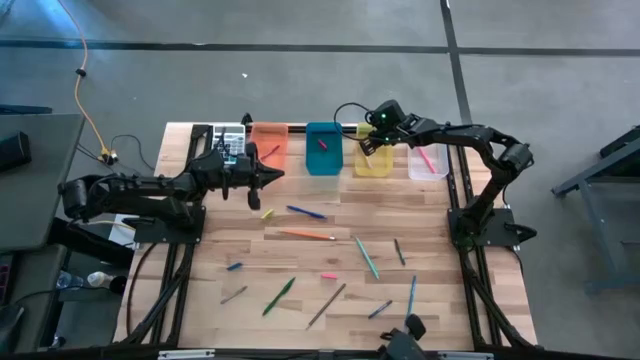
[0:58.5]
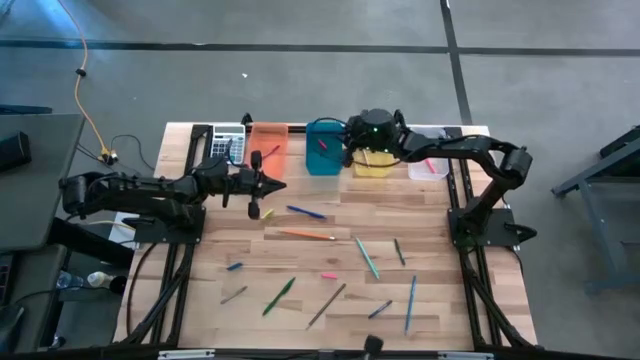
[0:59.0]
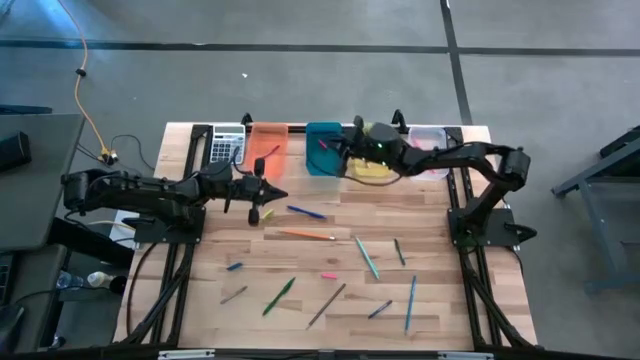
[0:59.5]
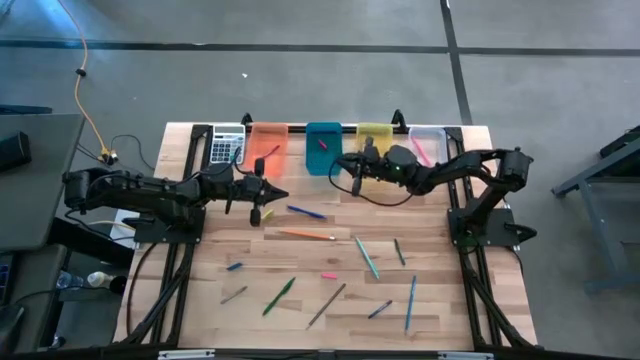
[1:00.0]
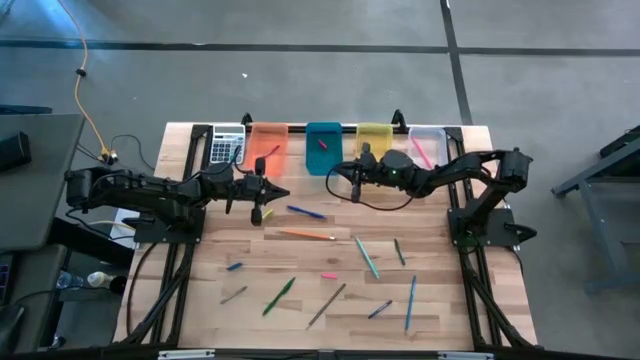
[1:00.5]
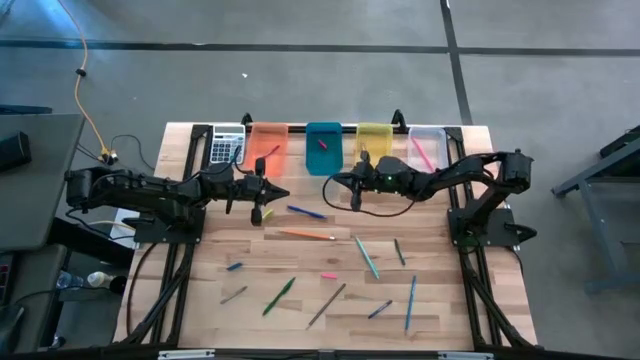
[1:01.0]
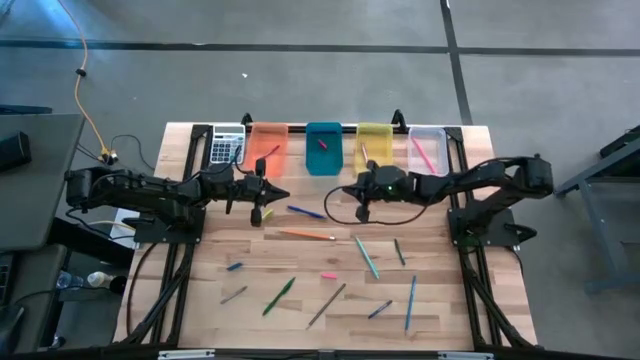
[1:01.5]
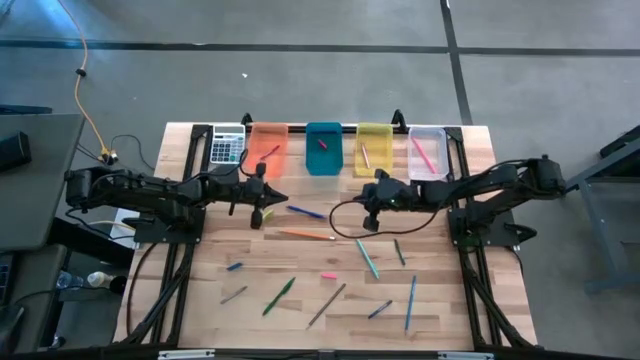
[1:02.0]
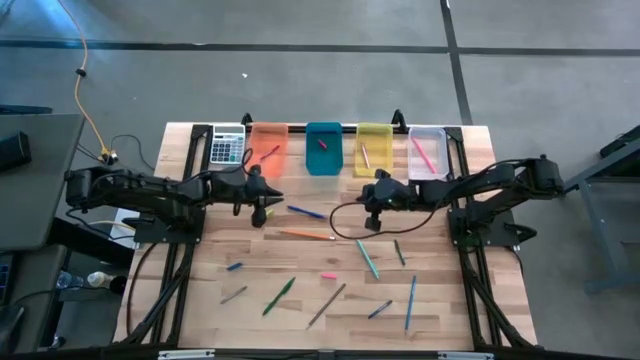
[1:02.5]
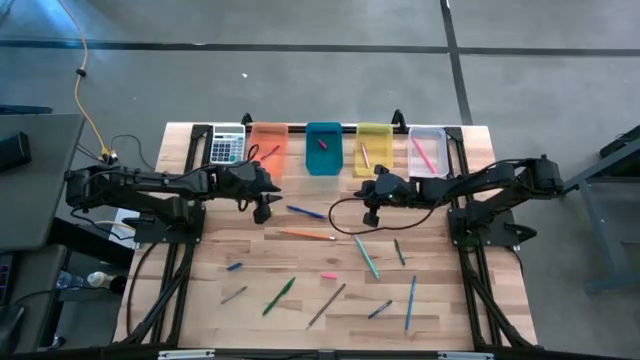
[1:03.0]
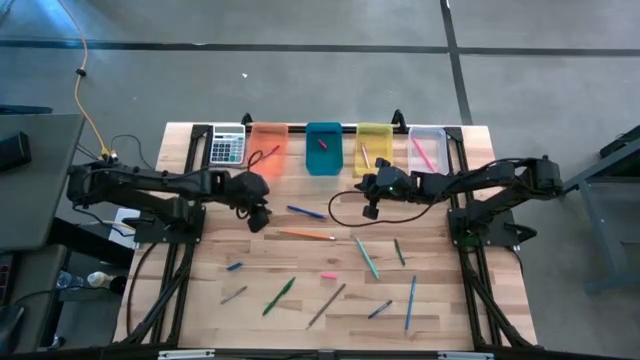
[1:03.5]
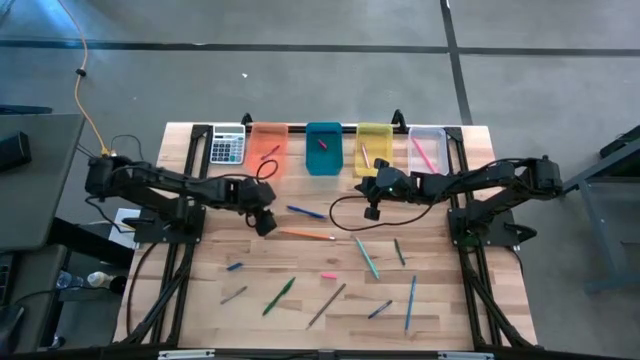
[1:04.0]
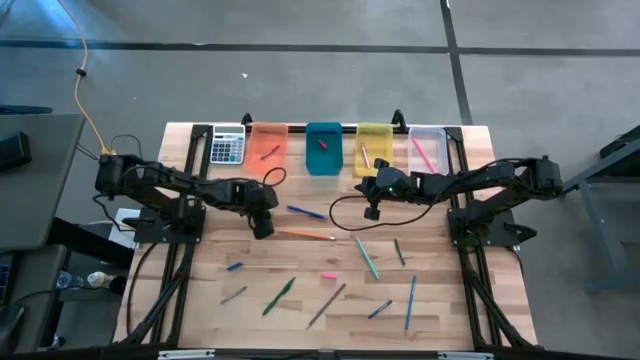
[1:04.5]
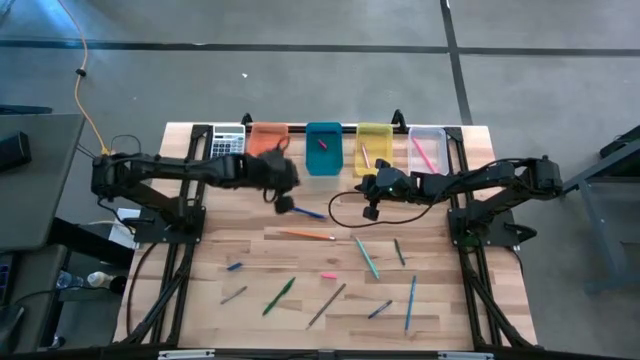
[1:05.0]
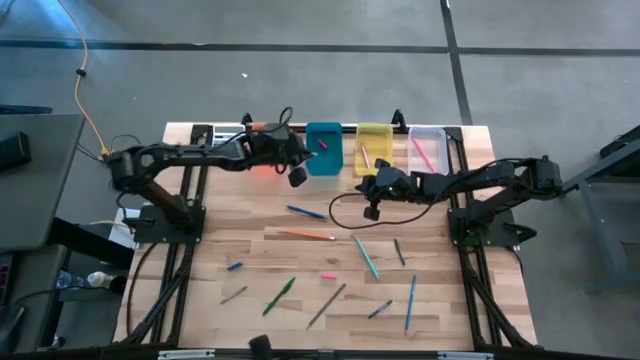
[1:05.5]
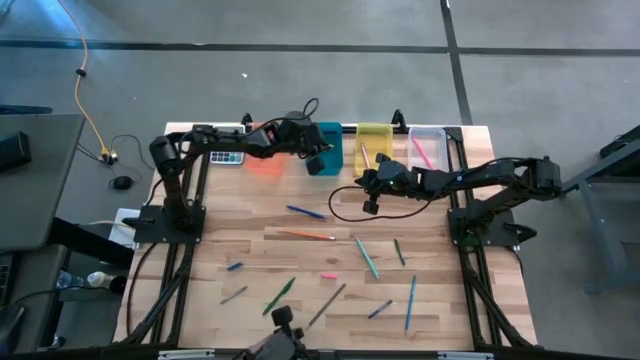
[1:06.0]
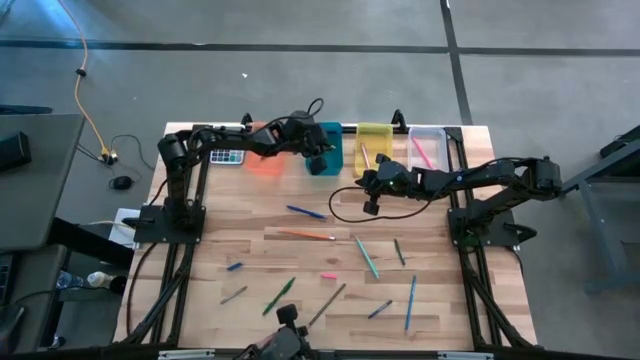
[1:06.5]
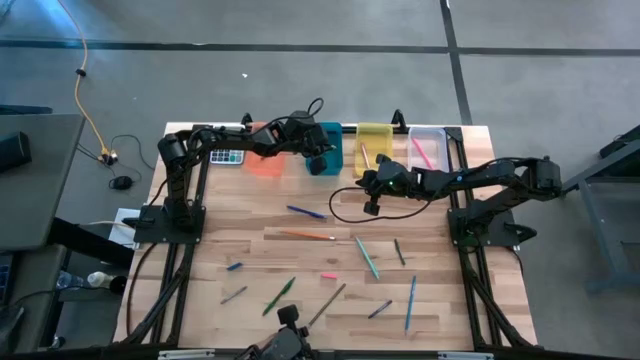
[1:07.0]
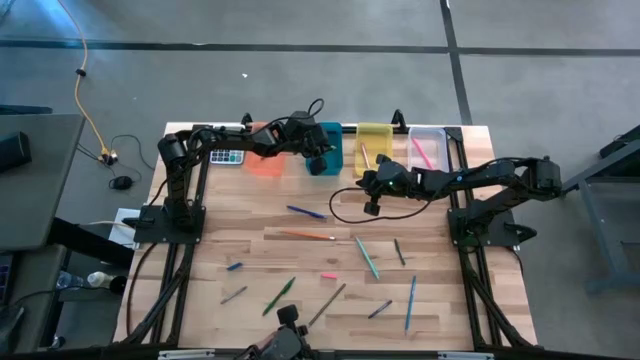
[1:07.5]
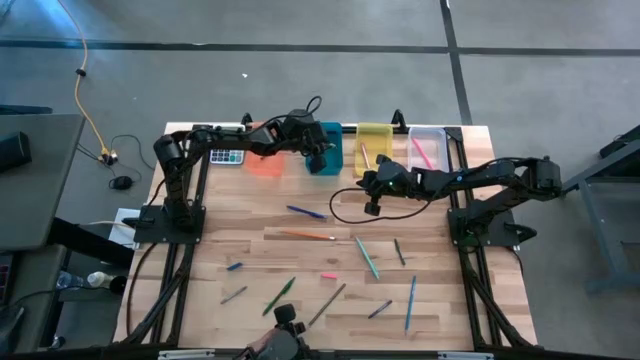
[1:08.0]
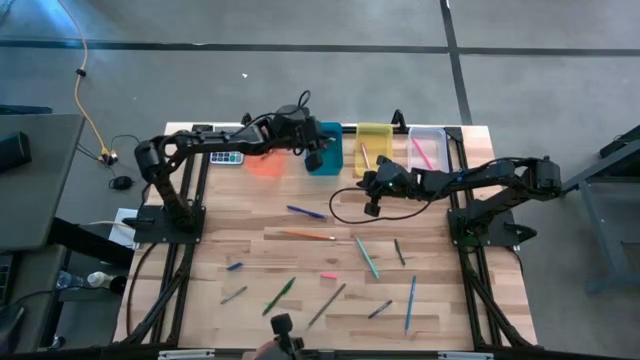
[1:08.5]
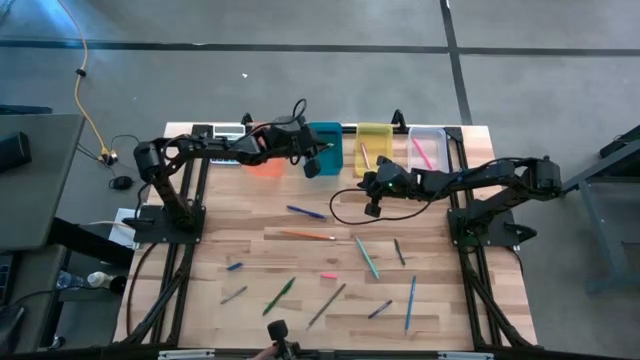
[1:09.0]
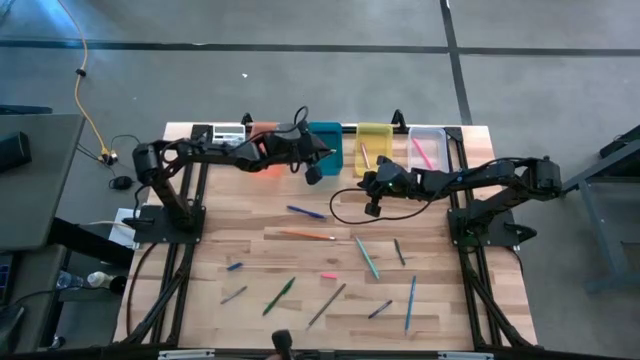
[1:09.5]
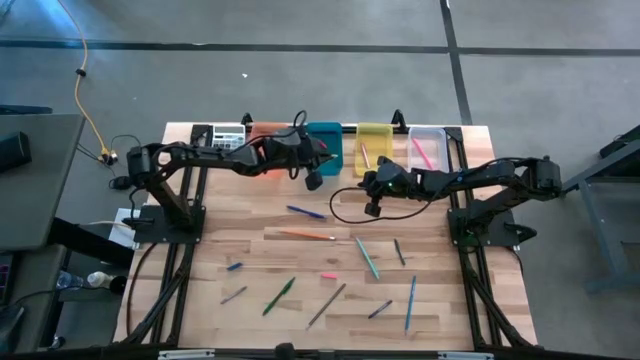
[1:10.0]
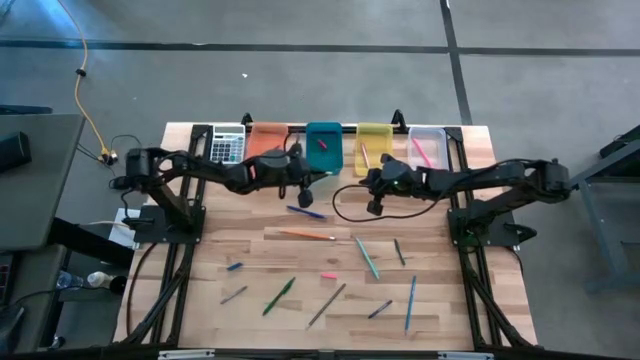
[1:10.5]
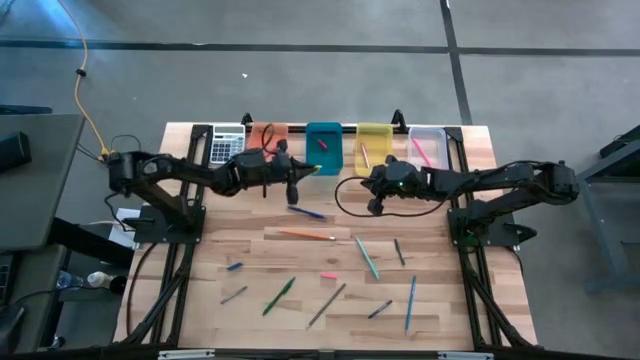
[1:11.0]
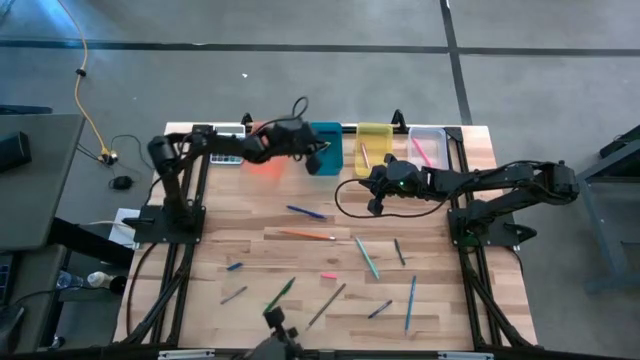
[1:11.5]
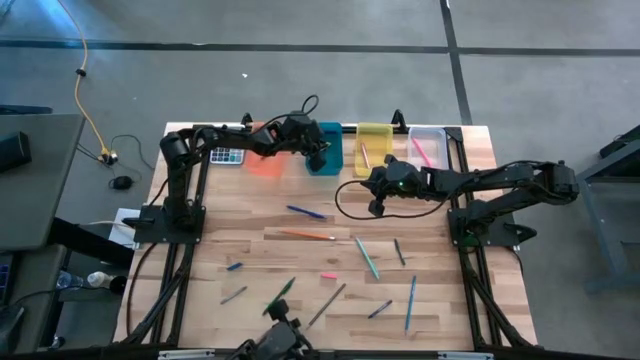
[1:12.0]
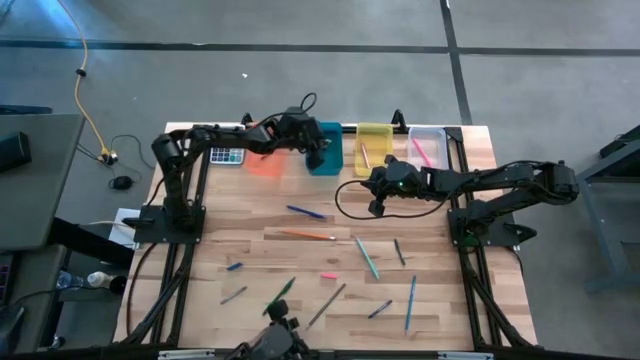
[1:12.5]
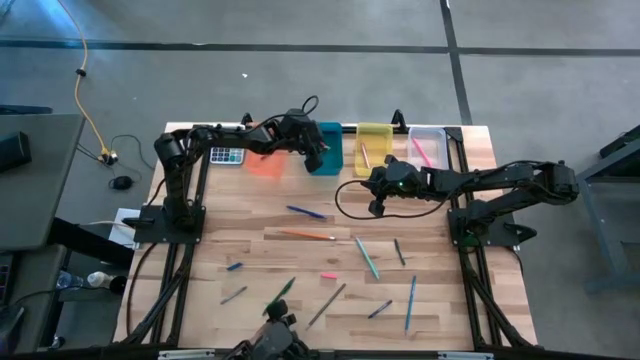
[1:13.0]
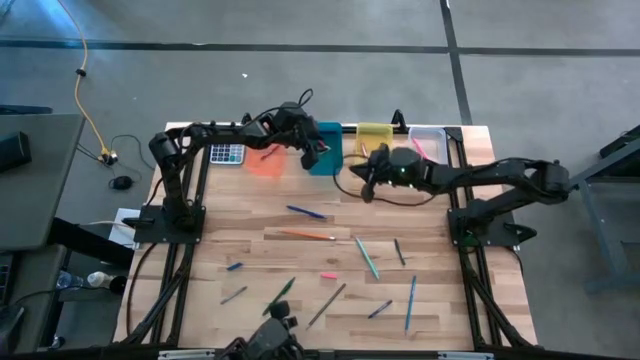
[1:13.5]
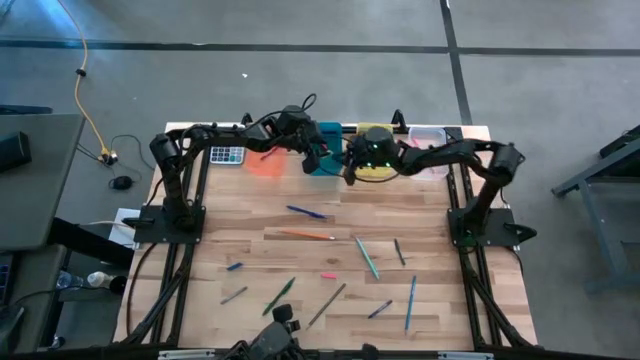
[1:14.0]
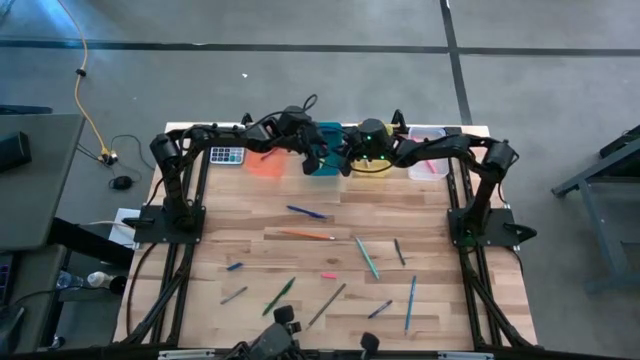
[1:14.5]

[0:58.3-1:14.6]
Task: Sort crayons/erasers/pens/pencils in bins
Put the green eraser into the blue bin

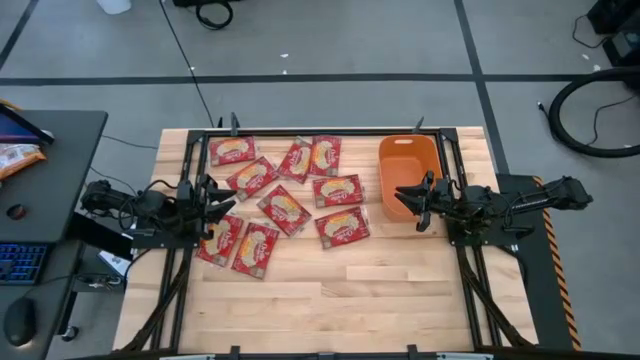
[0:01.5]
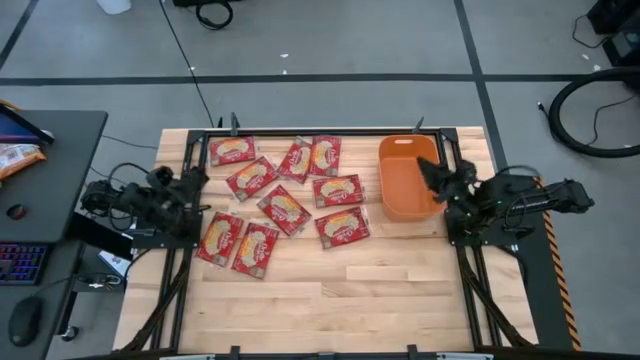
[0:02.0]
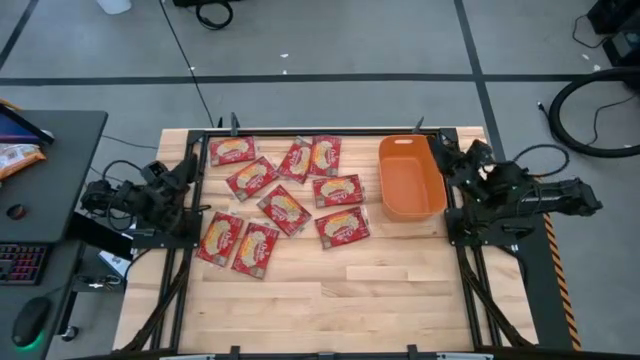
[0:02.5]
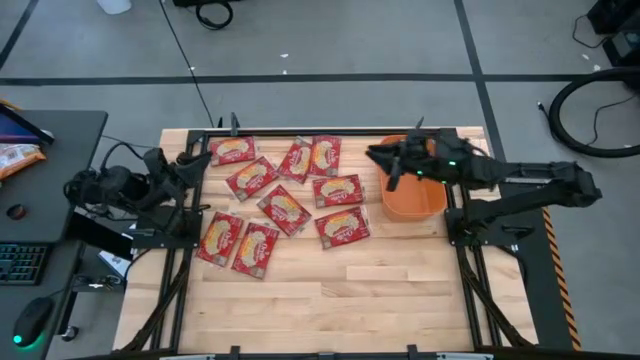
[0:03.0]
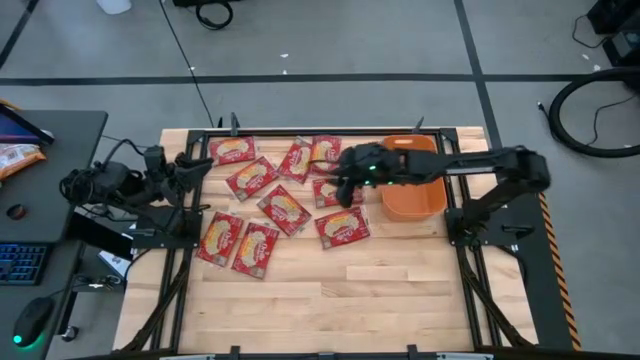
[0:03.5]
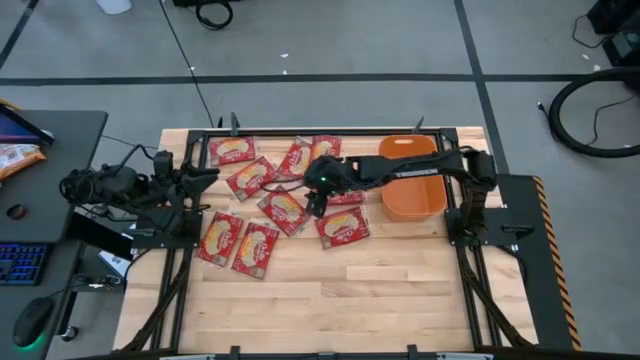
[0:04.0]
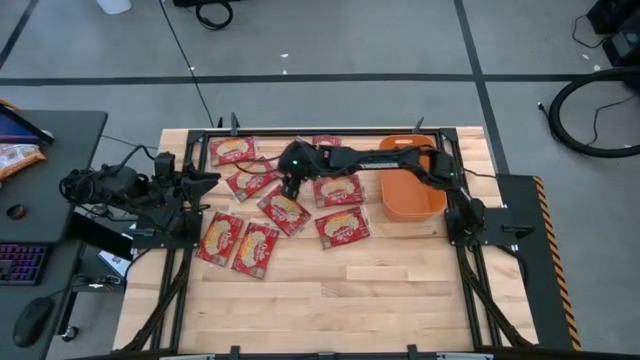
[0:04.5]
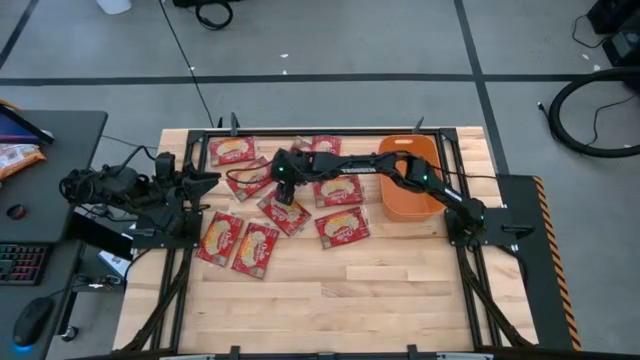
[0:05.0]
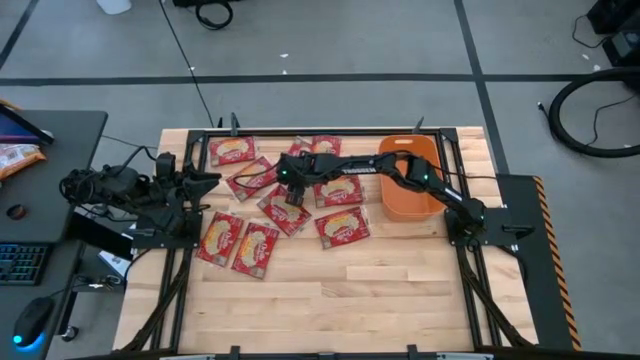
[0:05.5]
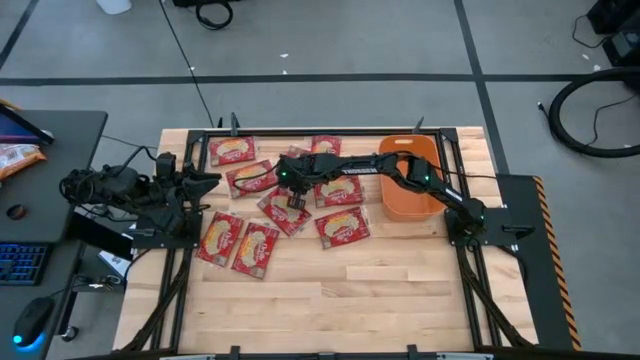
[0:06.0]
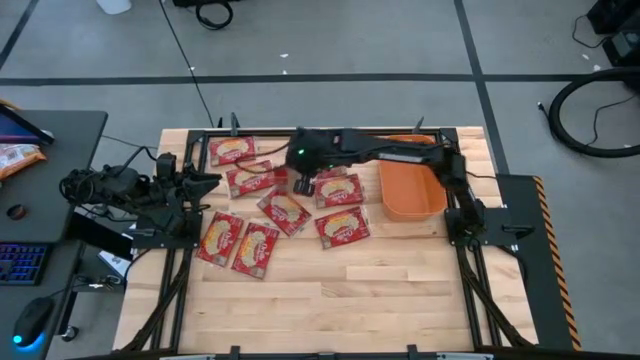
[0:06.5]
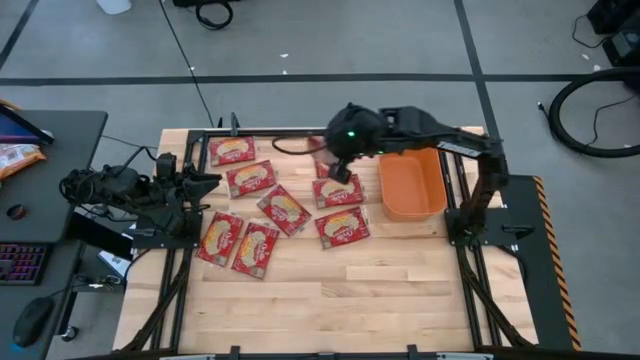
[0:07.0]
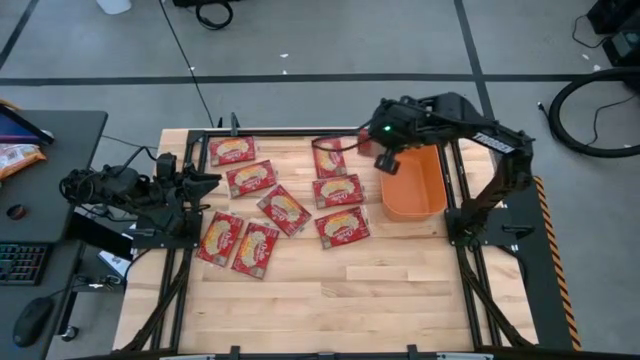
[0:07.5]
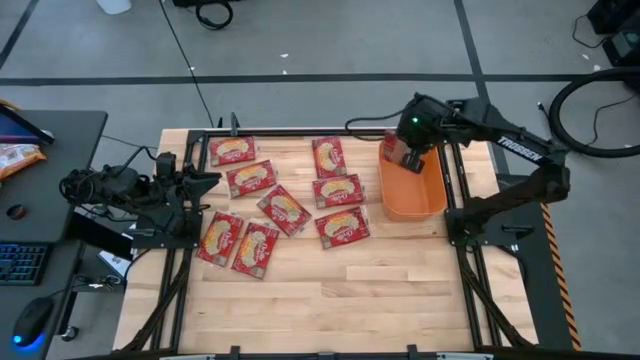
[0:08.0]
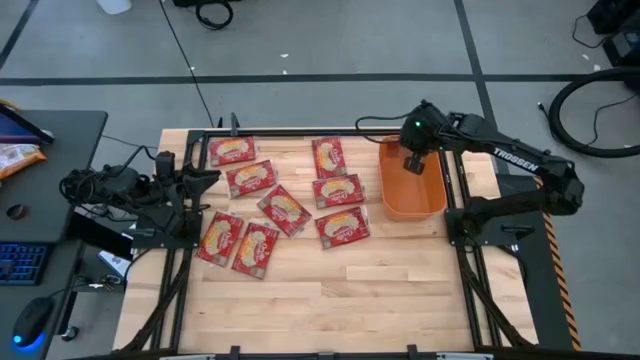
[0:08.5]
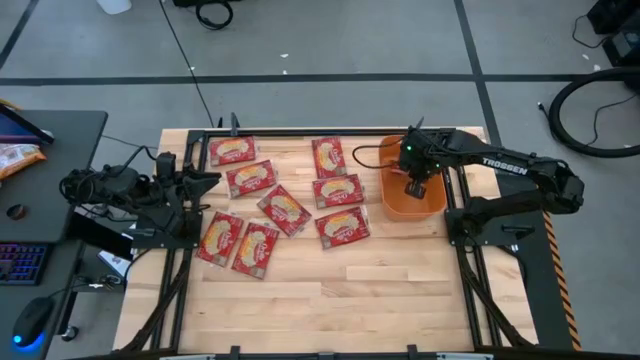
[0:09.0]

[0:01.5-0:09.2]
Task: Sort popcorn bags into baskets
Put the red popcorn bag into the orange bin
